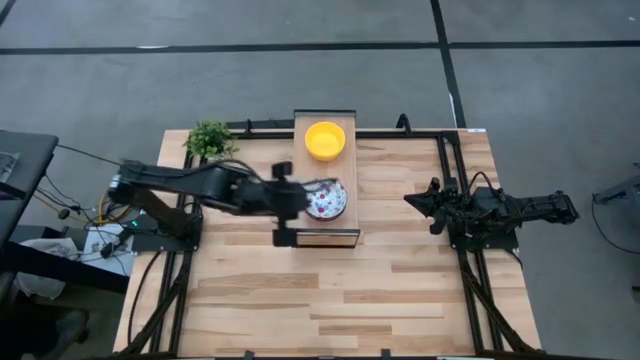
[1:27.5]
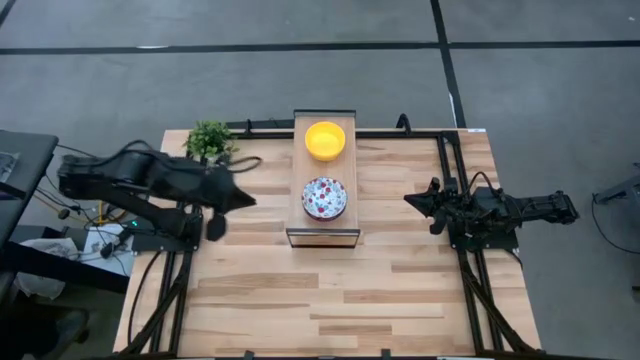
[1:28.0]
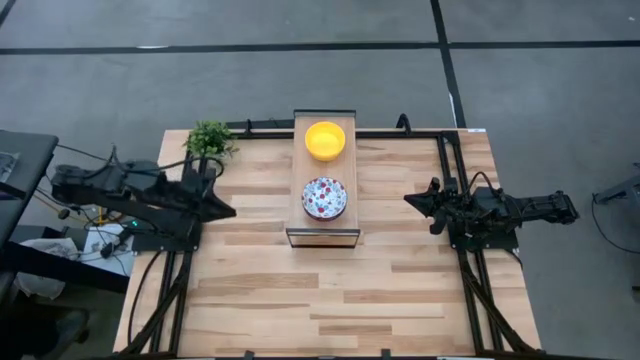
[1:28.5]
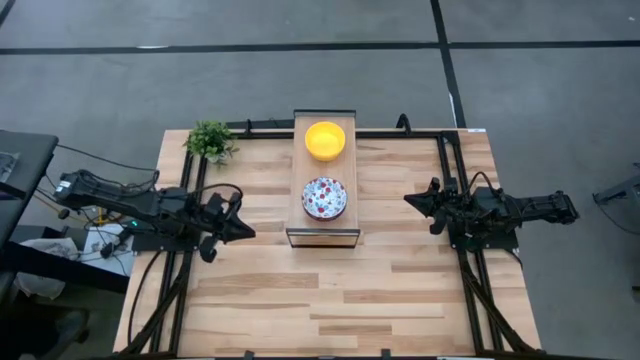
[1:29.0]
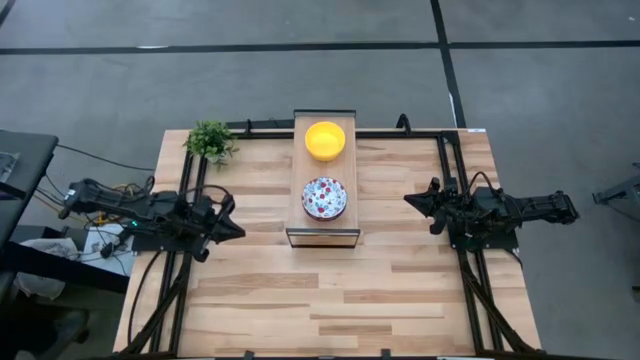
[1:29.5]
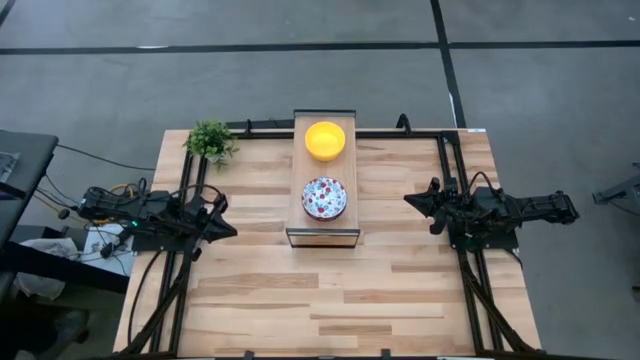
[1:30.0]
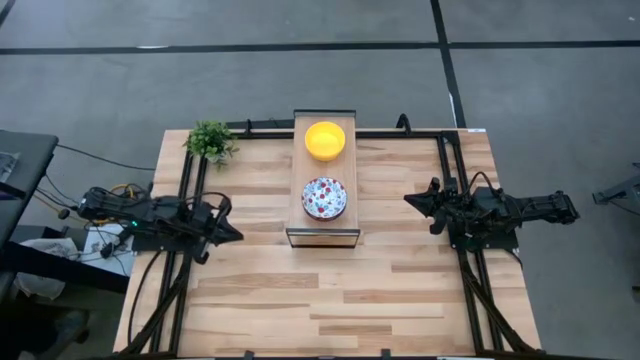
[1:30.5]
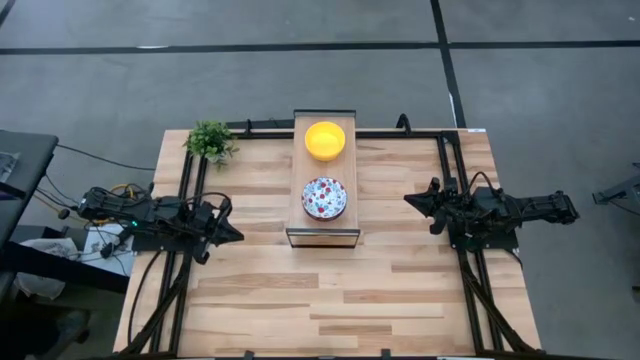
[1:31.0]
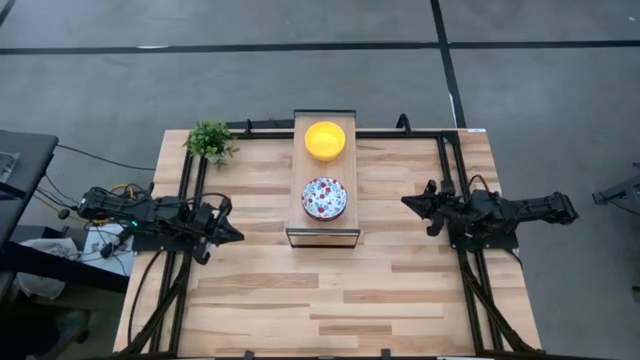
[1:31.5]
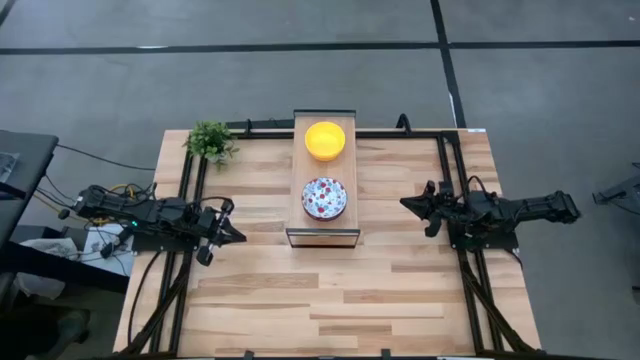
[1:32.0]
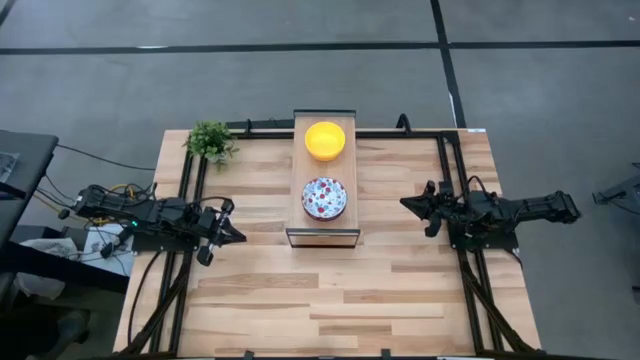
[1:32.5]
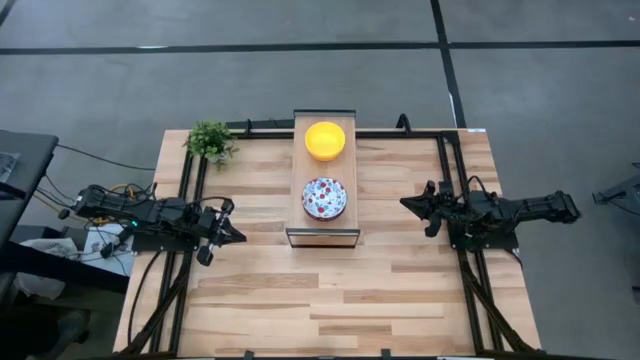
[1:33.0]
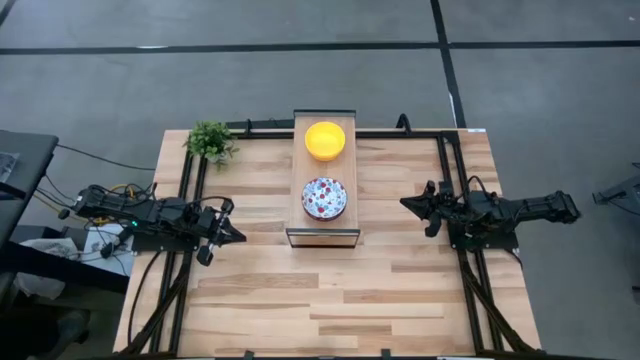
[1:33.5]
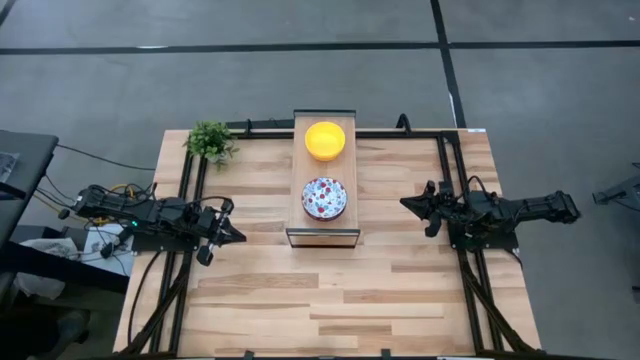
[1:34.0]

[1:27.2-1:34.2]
Task: Pick & Place Mini bowls
Return to Home Position

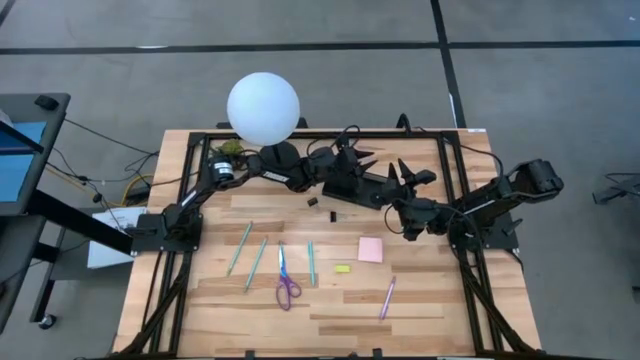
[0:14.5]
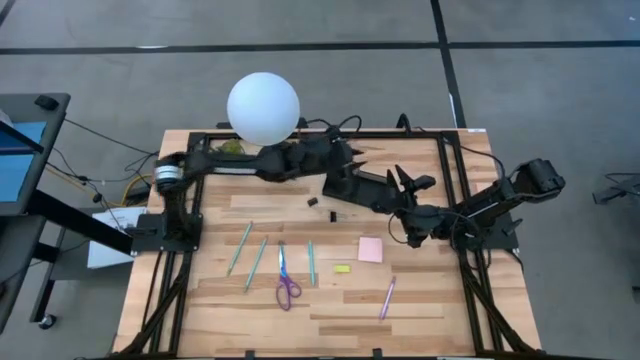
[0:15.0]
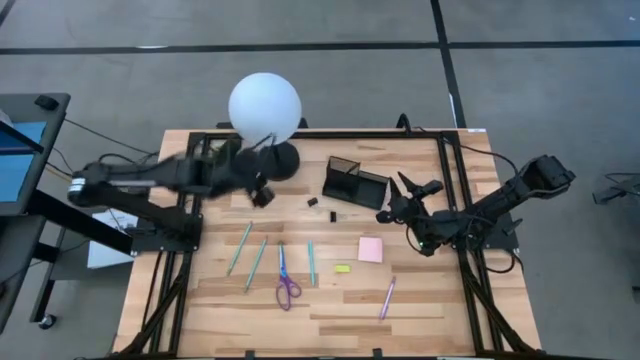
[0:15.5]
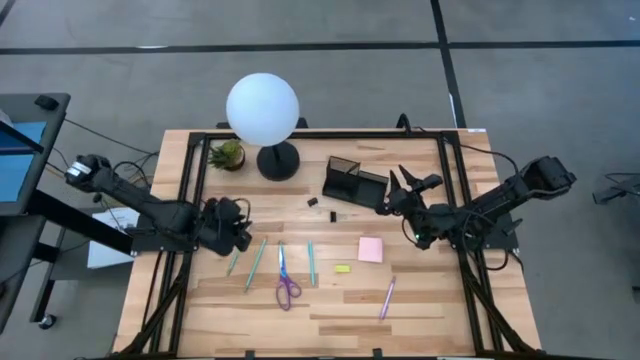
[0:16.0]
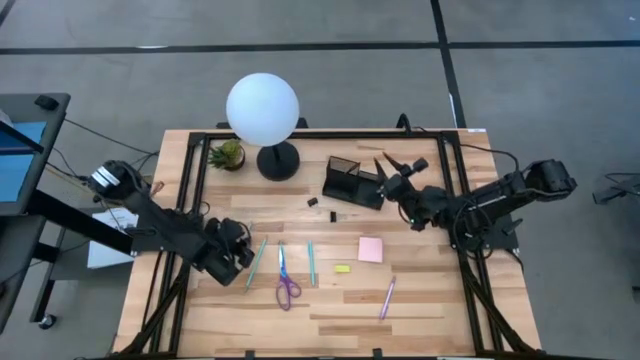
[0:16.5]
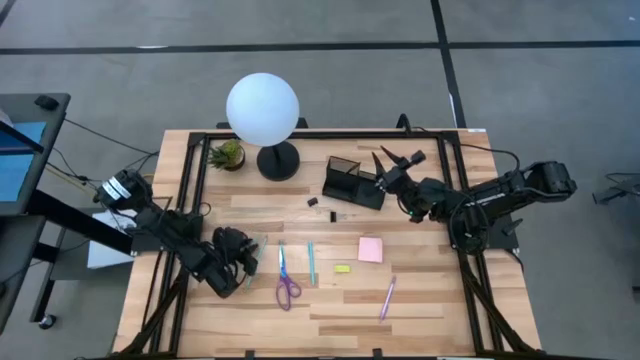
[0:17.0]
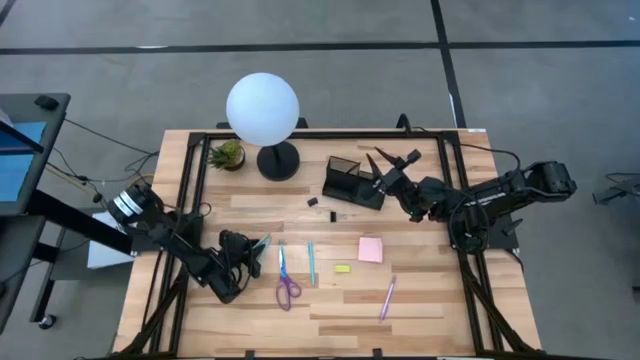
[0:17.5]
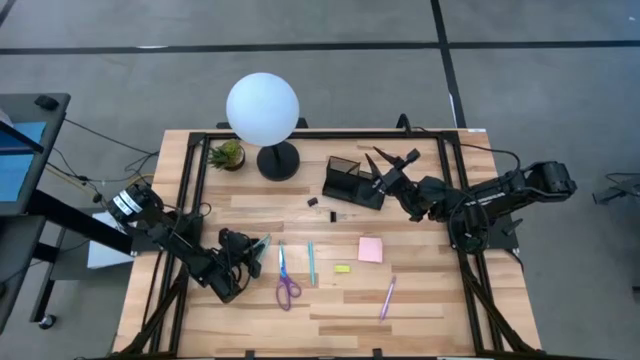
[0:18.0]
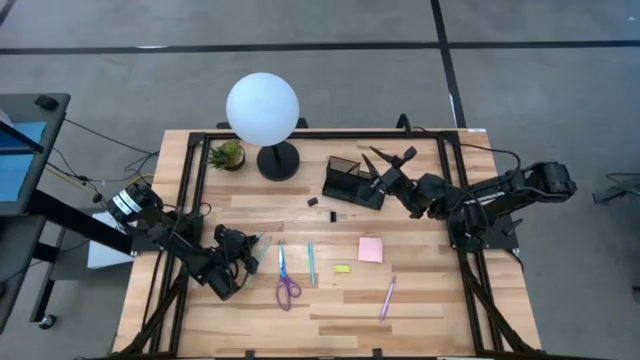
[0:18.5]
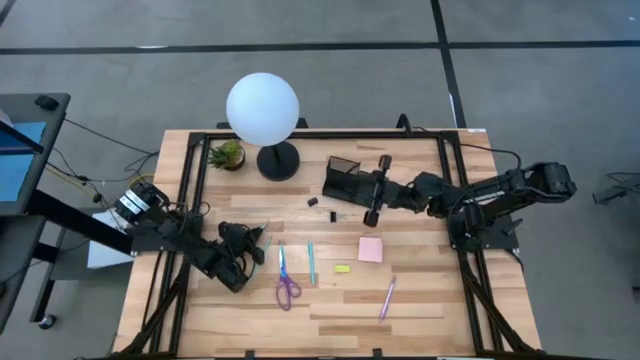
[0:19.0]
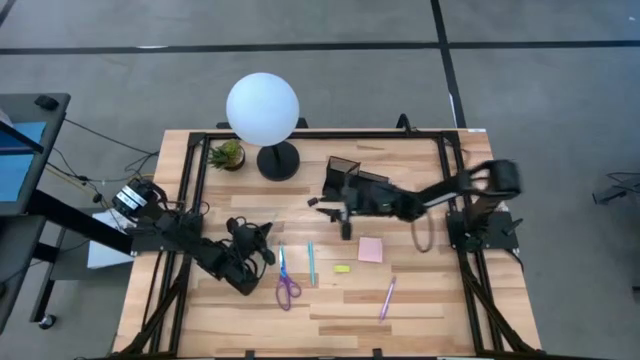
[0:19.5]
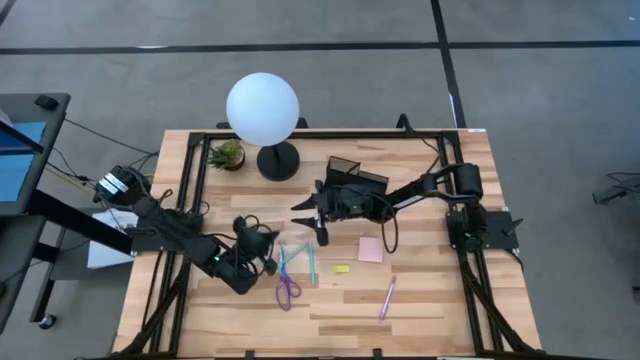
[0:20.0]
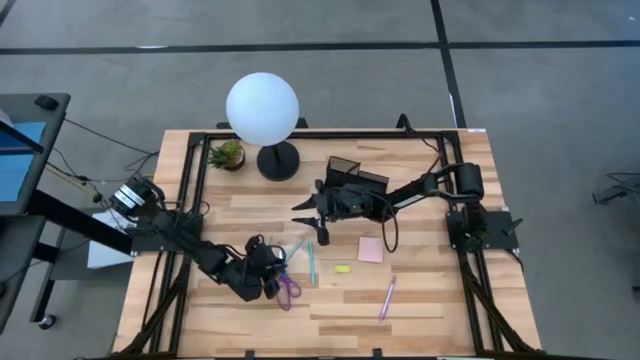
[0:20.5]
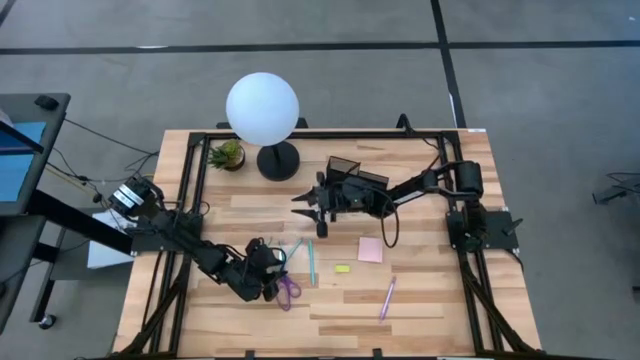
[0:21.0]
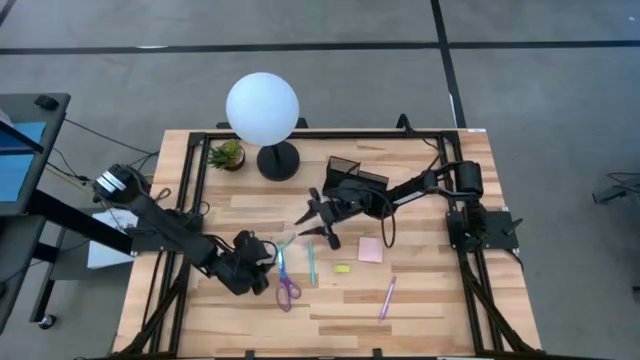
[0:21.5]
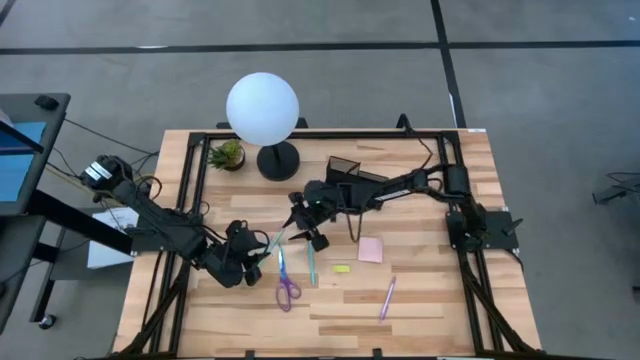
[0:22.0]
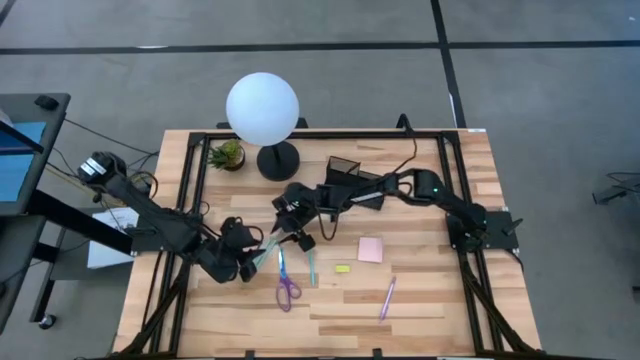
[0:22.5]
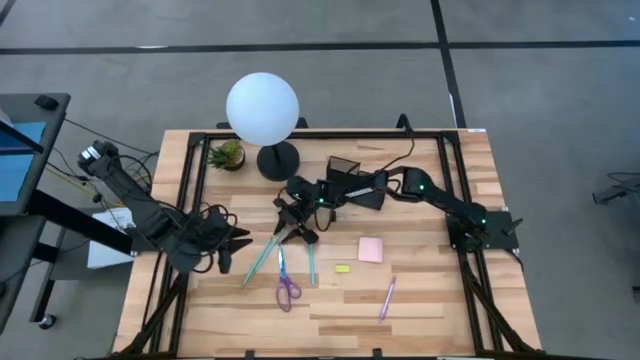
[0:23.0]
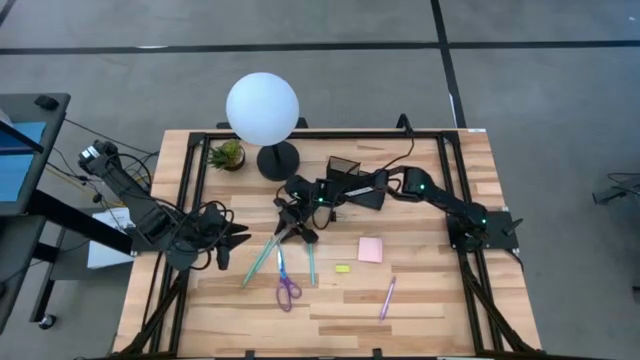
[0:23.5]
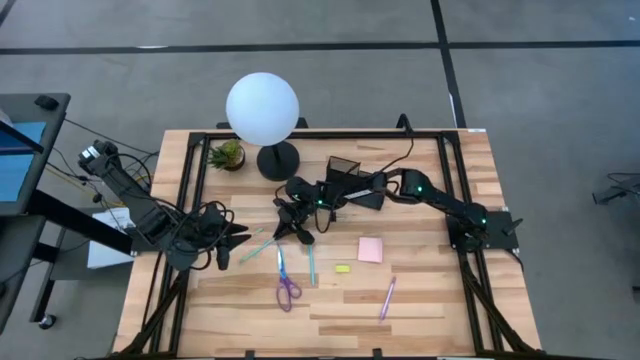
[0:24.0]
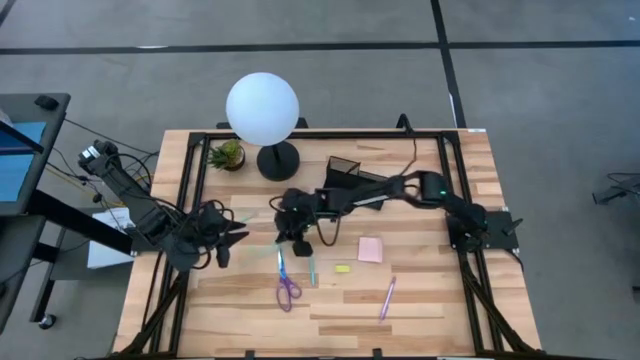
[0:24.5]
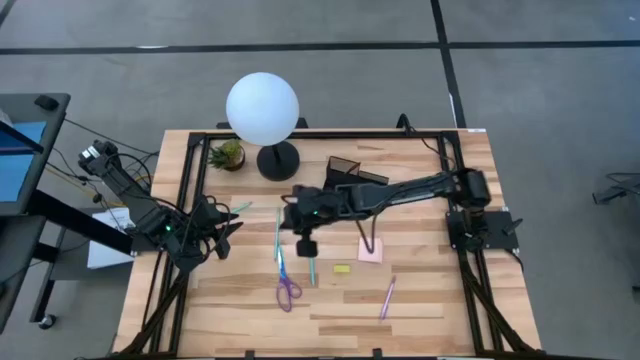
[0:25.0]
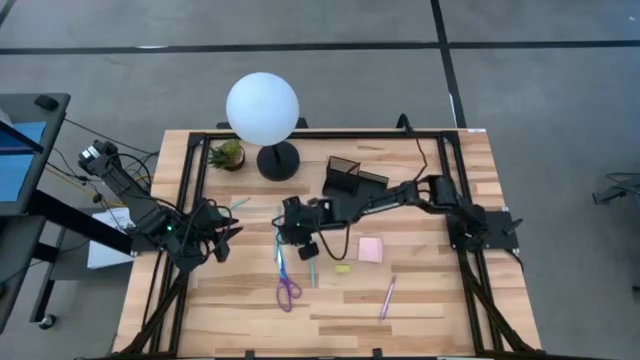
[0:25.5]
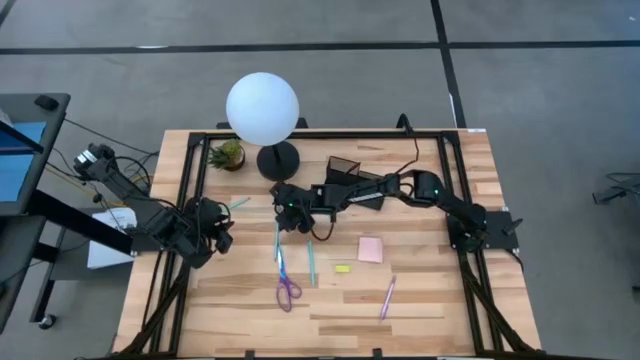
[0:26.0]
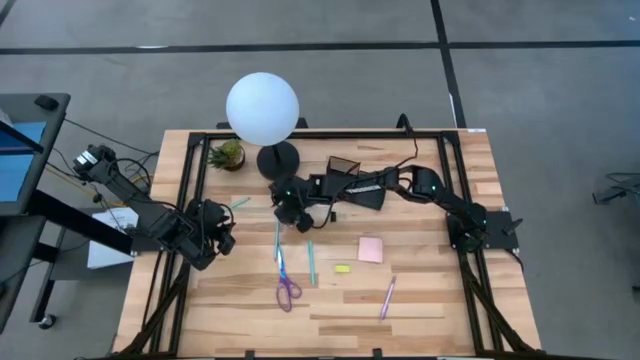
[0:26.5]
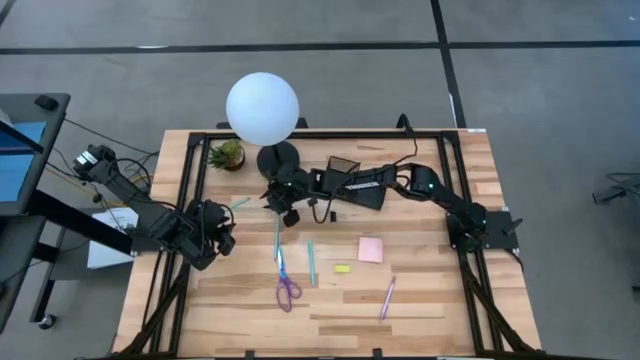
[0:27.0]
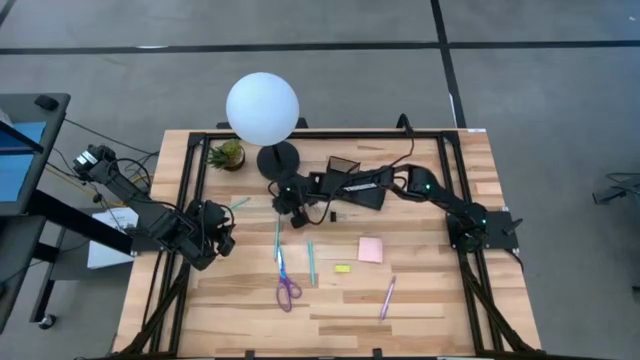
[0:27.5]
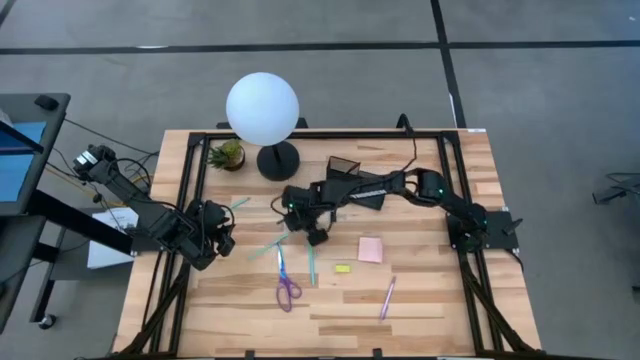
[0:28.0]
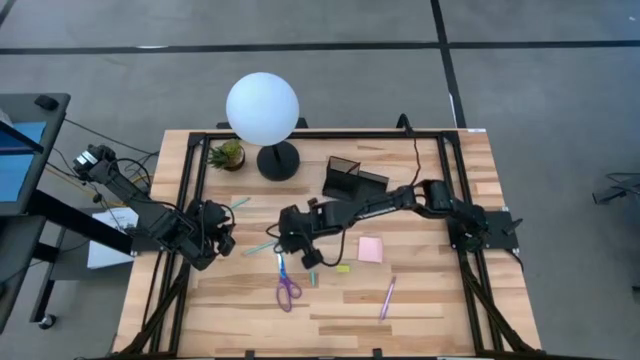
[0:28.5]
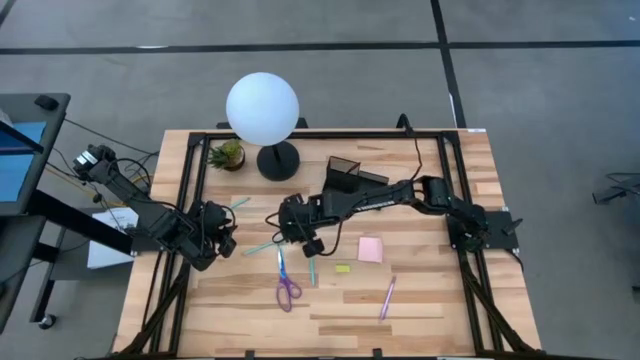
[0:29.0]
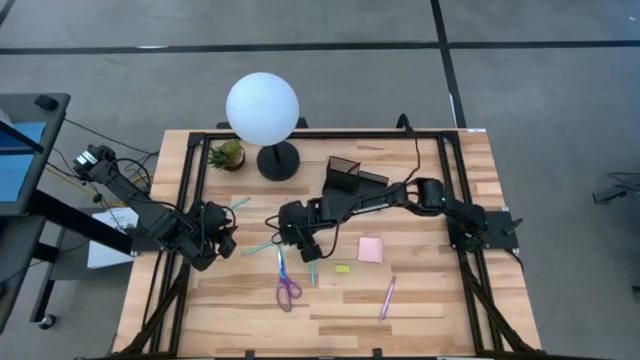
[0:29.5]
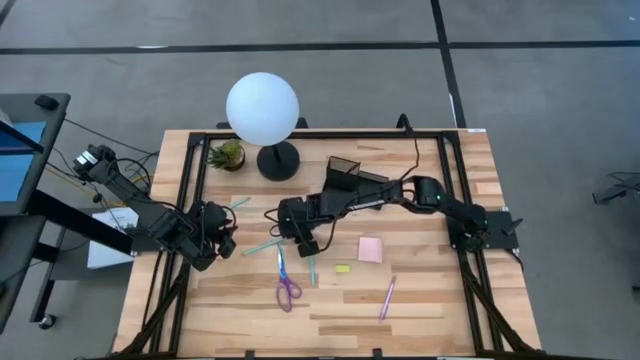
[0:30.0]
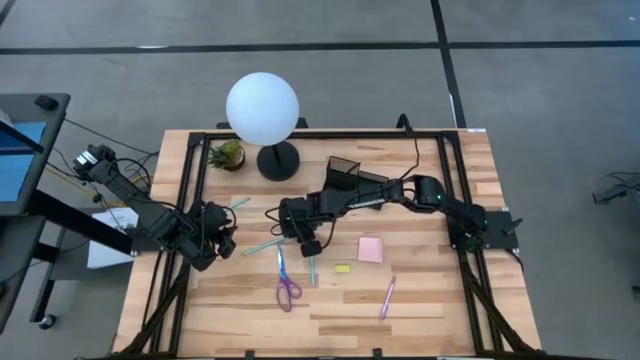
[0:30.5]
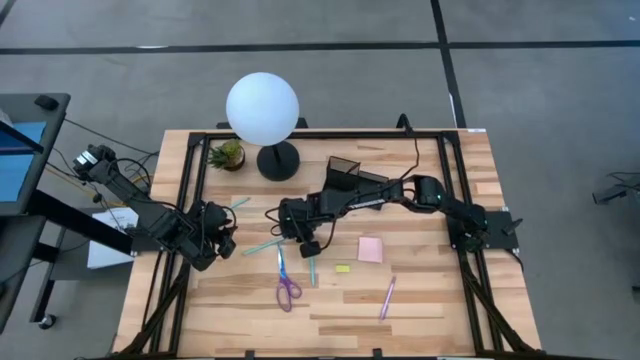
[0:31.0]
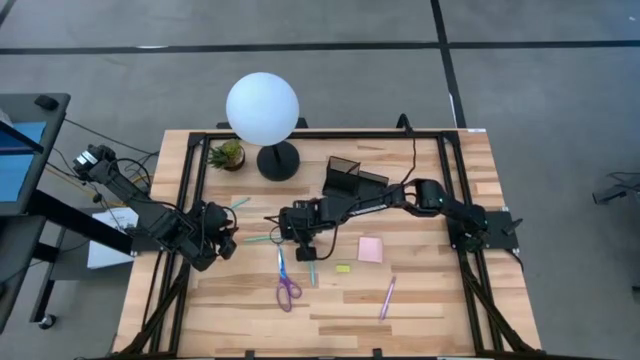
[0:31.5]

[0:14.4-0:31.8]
Task: Pick and place office supplies into organizer
Put the blue pencil into the black desk organizer
